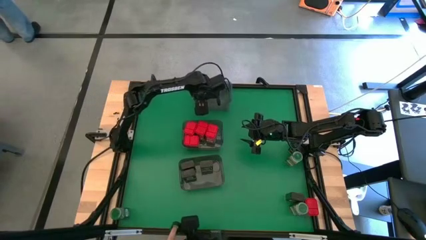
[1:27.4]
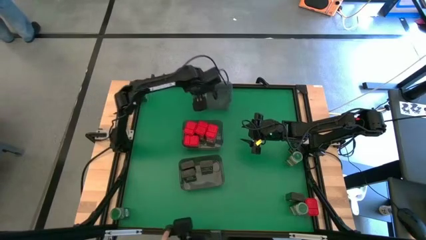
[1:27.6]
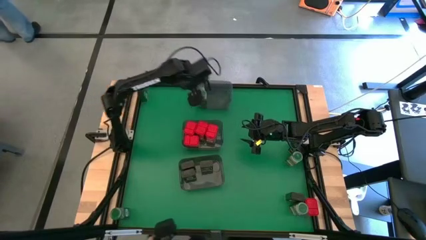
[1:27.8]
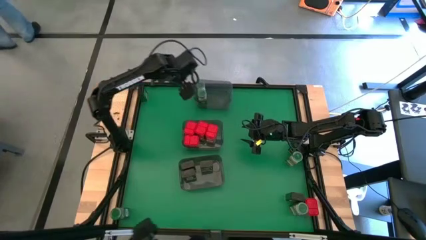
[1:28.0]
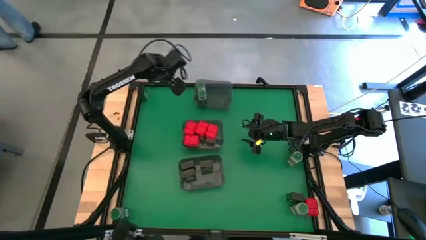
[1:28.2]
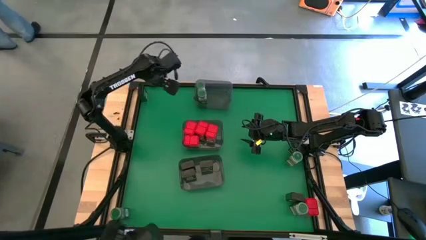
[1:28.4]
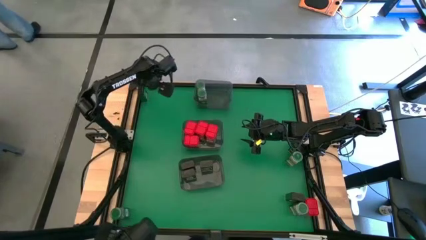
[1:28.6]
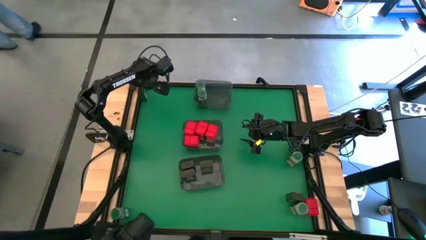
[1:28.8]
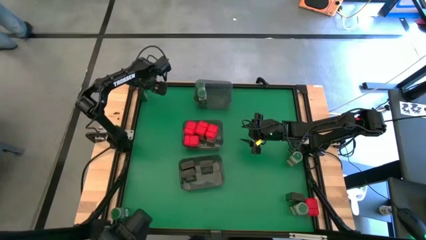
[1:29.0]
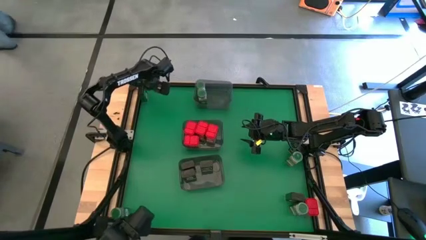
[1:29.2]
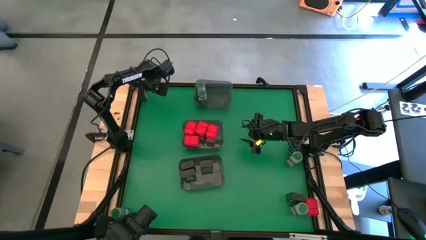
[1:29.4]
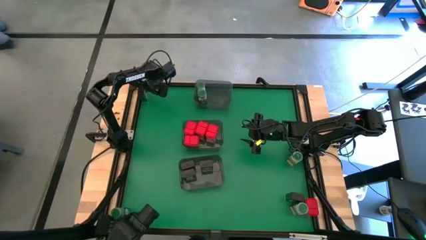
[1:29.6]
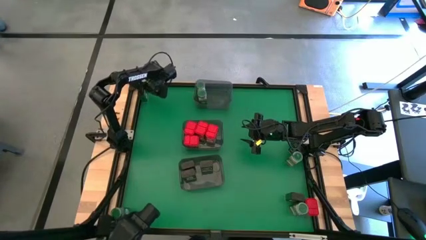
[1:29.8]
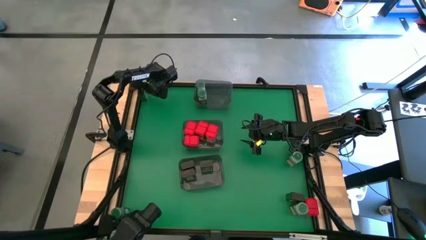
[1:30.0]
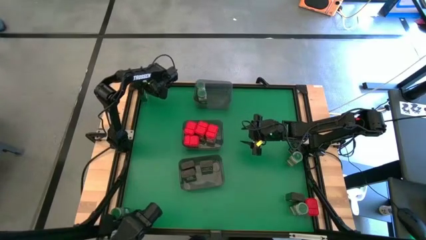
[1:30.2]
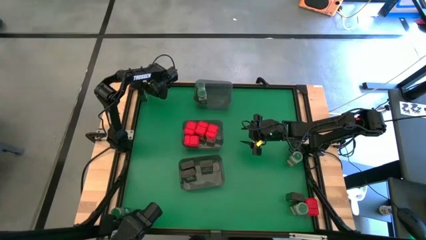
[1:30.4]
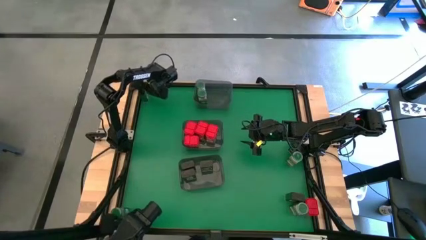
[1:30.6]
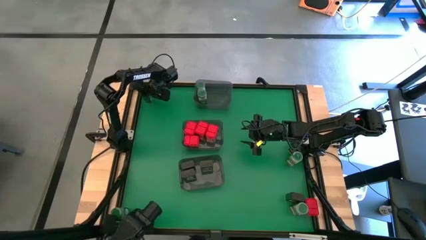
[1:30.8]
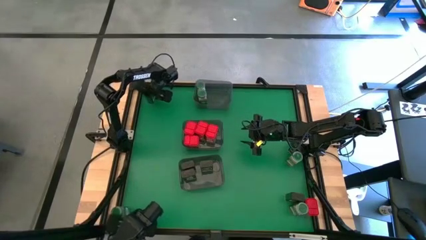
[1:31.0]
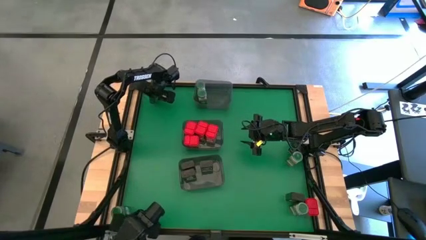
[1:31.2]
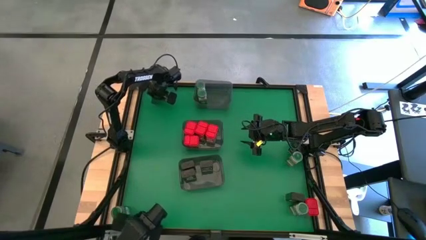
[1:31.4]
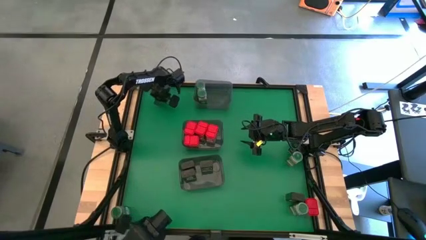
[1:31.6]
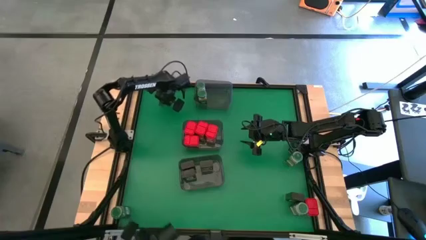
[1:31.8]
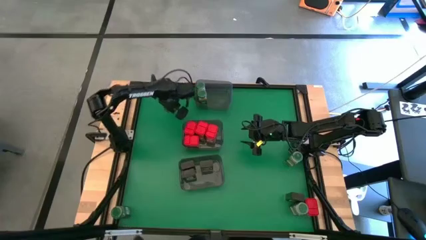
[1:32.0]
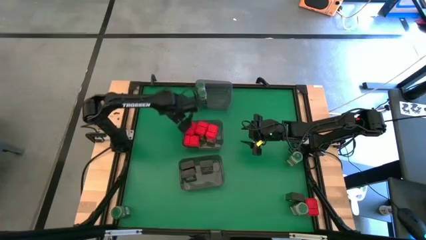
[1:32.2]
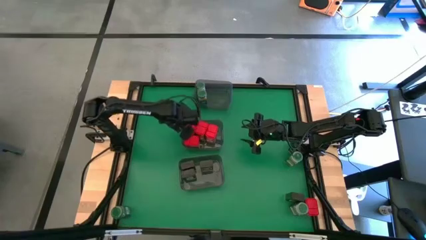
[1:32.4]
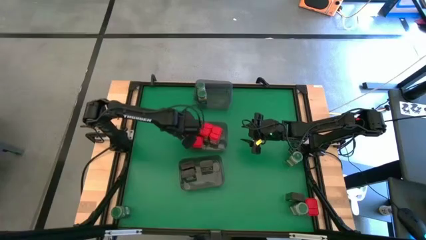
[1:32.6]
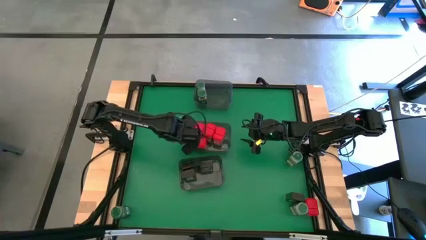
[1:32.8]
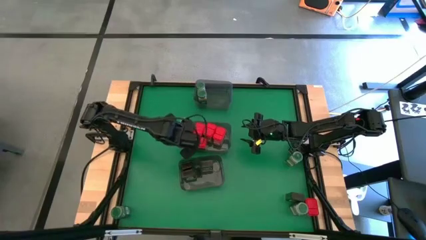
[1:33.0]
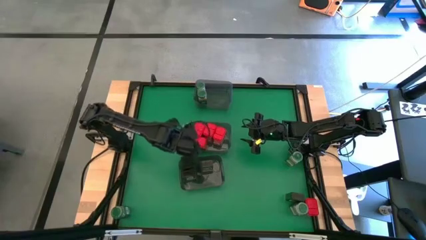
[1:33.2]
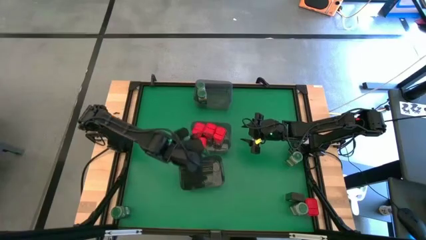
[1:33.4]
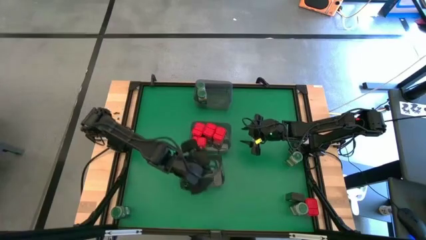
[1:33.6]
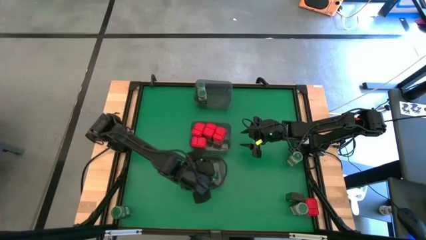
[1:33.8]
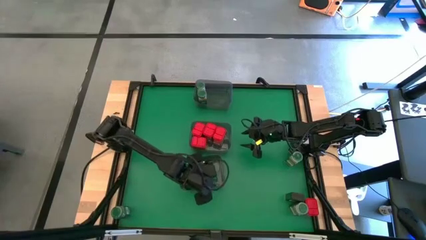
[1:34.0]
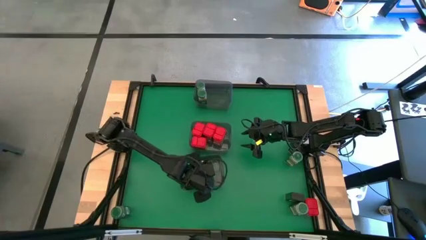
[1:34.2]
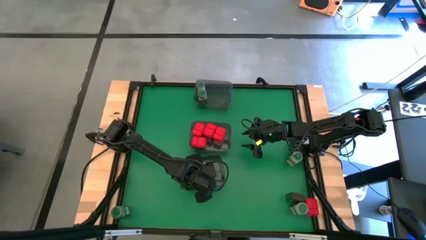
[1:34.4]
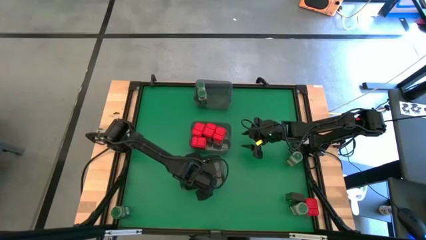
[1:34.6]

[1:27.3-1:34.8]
Task: Sort spices by type
Put the black seasoning can into the bottom gray bin

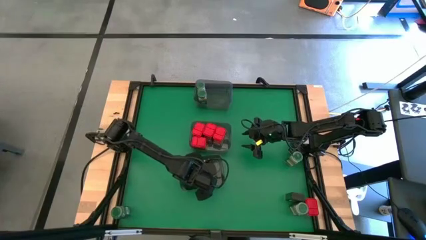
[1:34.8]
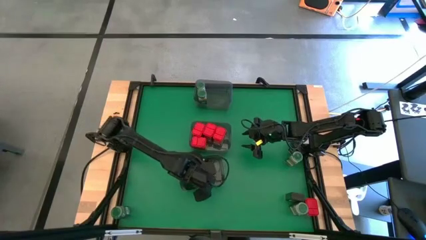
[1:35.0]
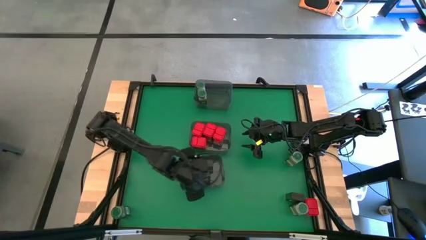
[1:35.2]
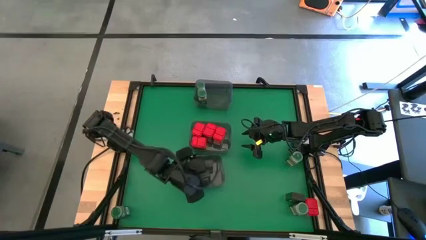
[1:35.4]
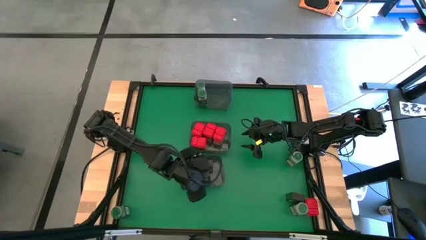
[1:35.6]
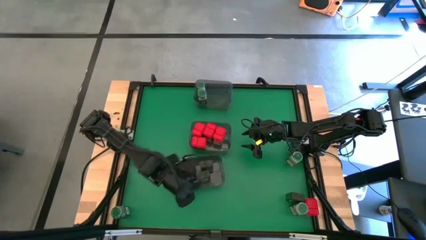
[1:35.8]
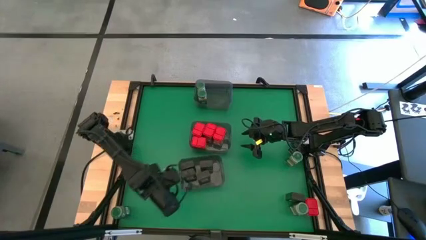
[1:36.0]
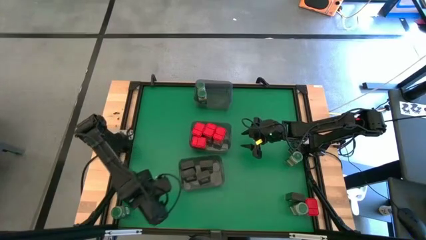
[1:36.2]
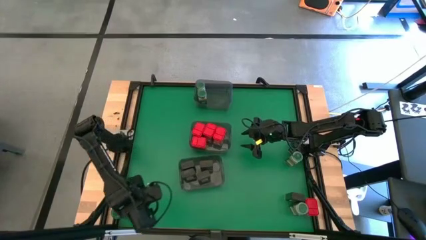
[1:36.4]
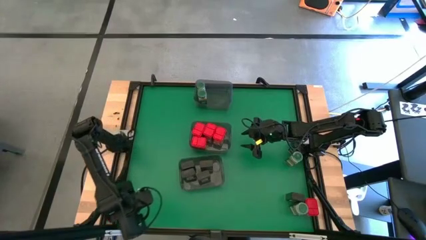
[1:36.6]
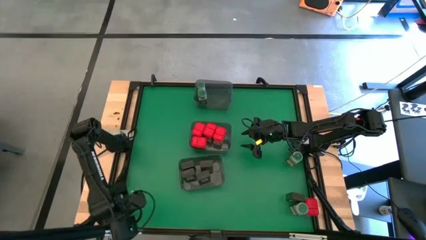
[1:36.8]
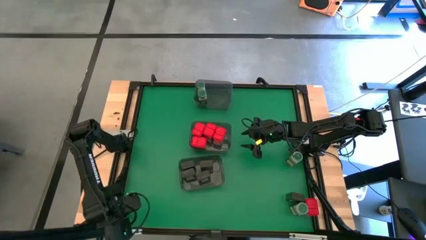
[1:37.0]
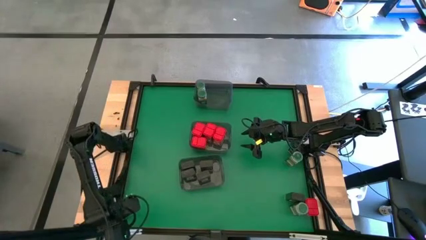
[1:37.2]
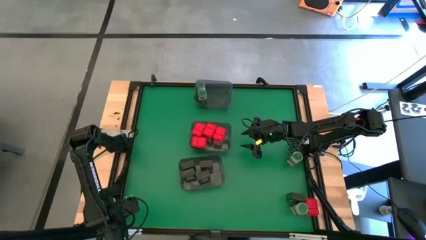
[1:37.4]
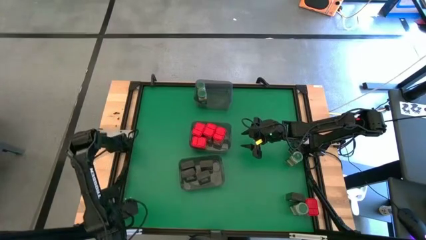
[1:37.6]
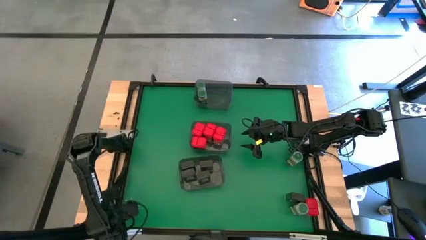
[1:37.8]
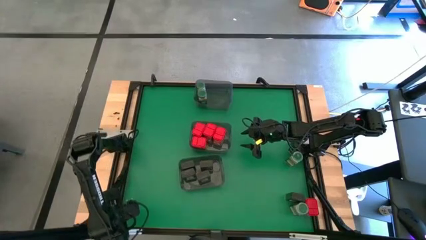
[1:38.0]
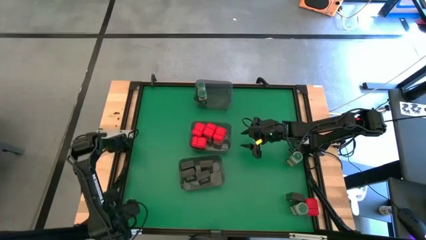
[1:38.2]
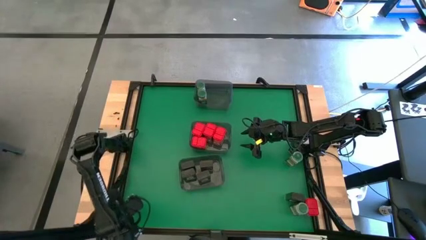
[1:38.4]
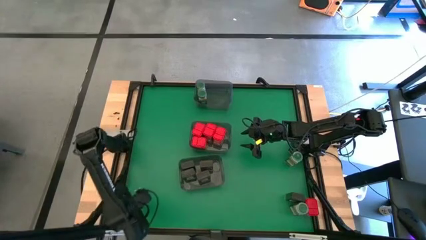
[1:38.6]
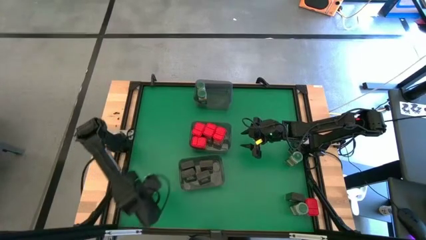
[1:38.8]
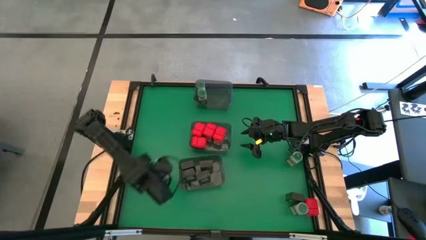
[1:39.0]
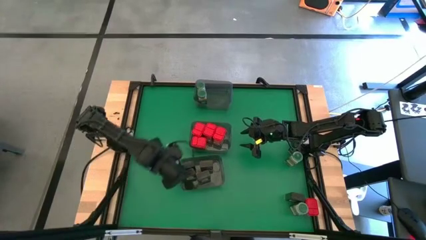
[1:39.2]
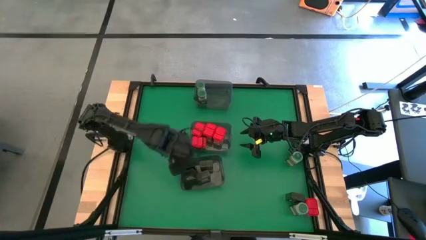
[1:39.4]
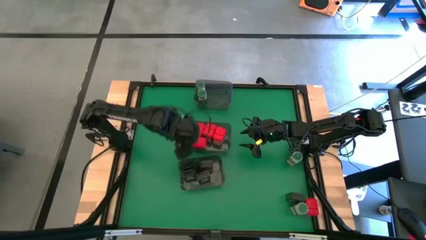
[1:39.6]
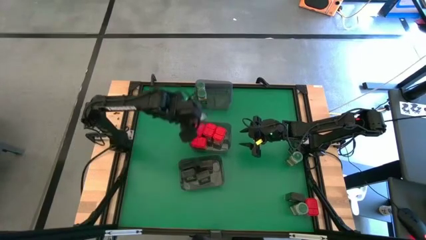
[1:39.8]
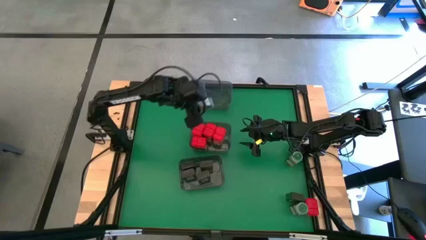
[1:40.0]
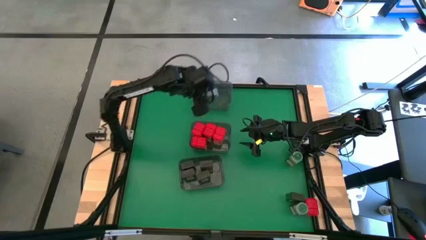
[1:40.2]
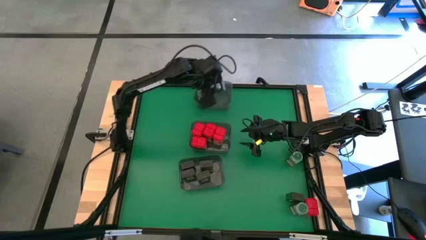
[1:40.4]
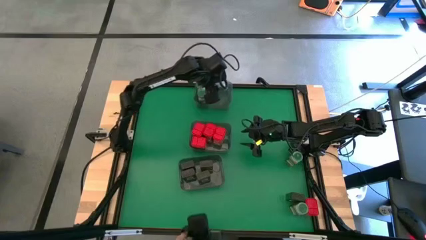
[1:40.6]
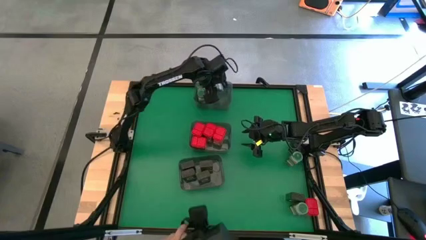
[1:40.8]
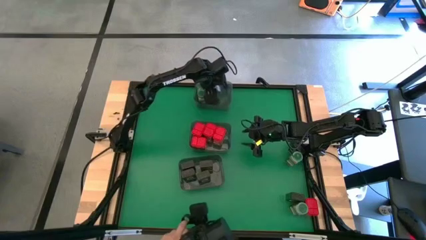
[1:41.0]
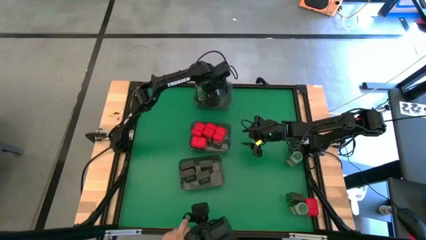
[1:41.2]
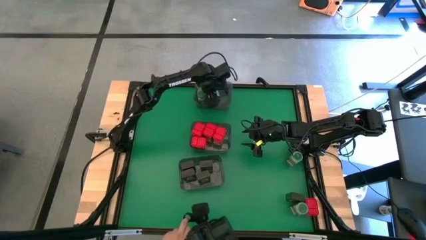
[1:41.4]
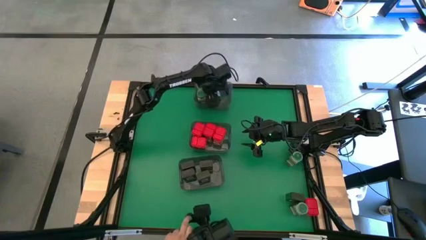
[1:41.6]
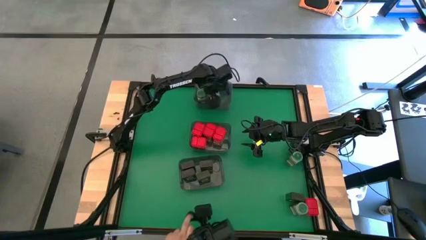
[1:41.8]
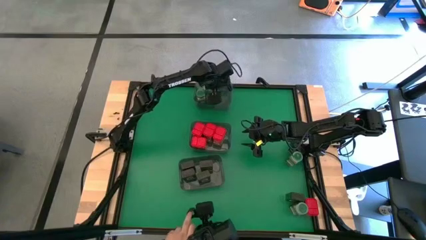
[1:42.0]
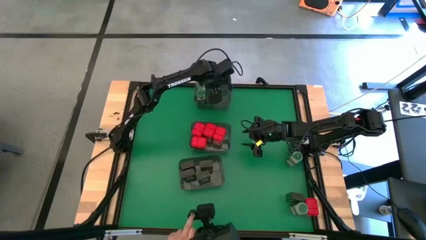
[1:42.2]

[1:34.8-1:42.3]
Put the green seasoning bottle into the top gray bin

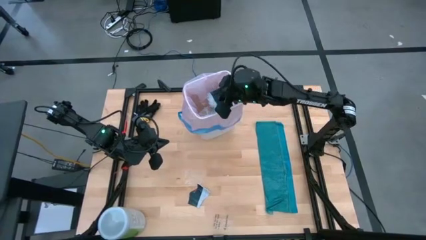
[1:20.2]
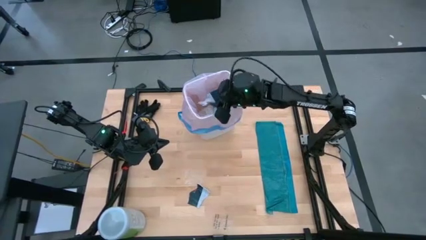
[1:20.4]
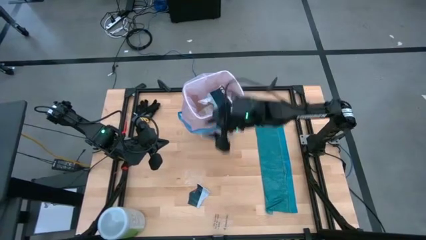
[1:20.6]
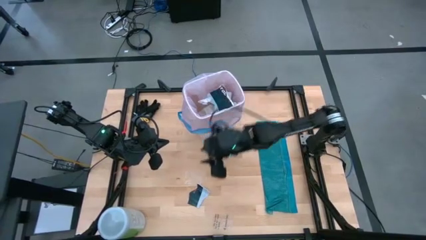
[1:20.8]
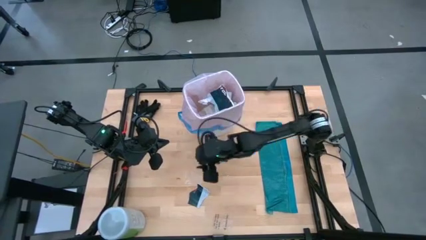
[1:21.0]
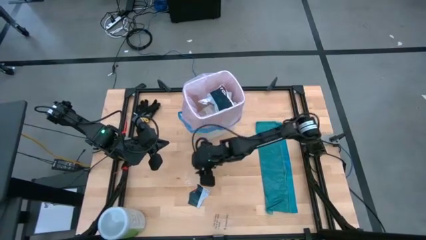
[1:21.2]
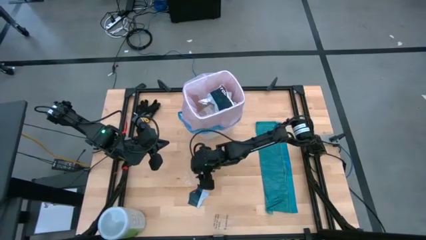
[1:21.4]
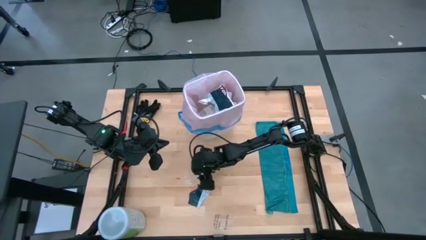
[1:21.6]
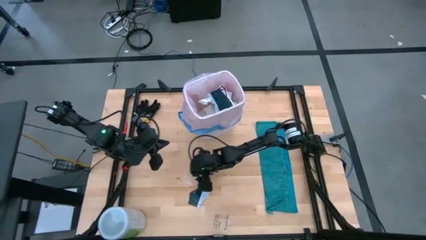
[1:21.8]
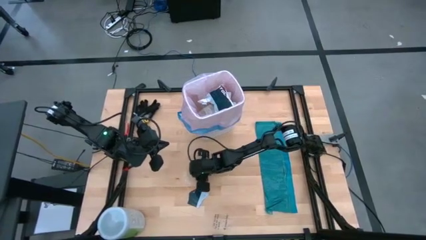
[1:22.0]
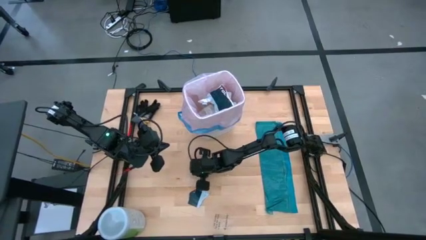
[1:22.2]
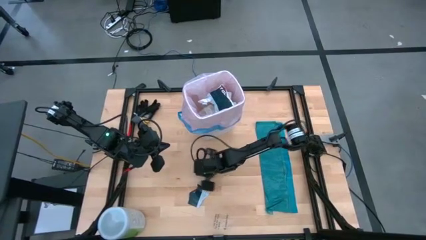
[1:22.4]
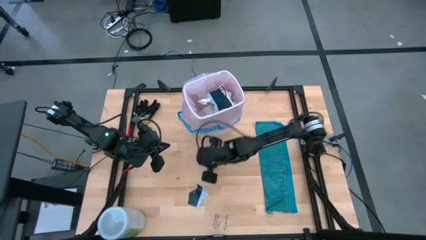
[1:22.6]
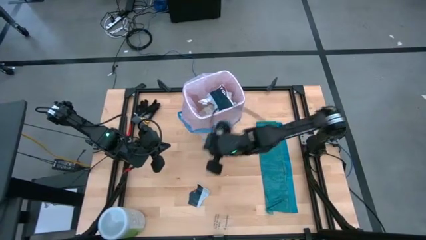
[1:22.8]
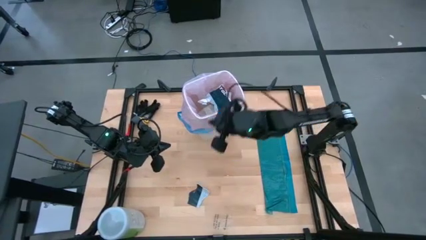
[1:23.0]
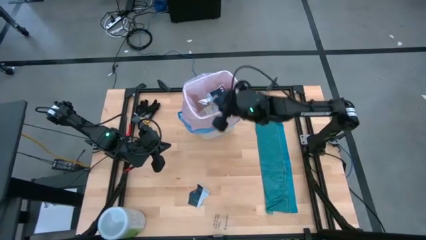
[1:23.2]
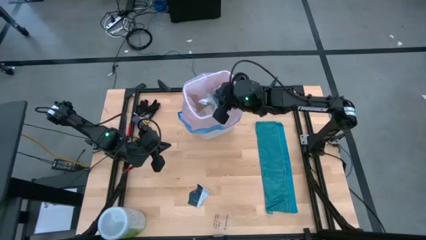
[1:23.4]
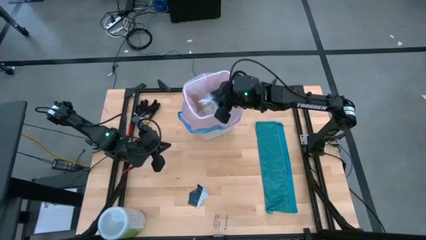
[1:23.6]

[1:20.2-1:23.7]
Task: place trash/remove bag and relplace
Put the transparent plastic into the white trash bin
